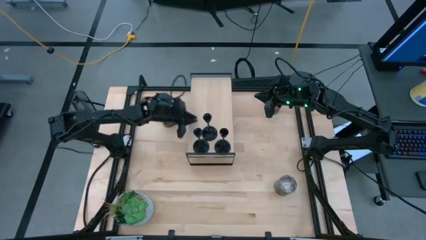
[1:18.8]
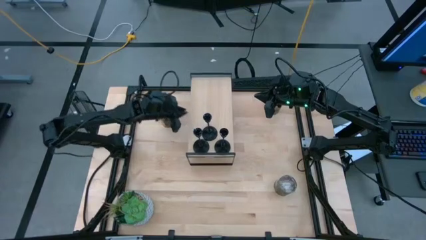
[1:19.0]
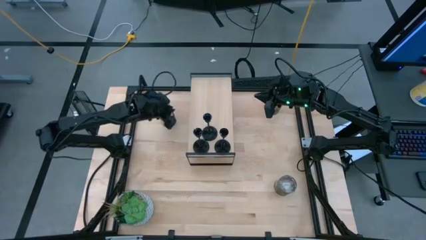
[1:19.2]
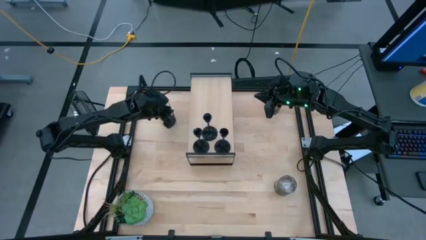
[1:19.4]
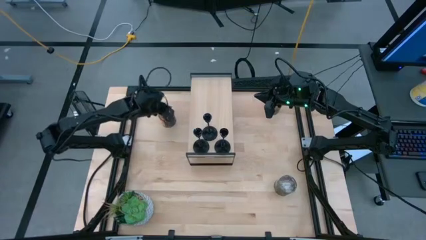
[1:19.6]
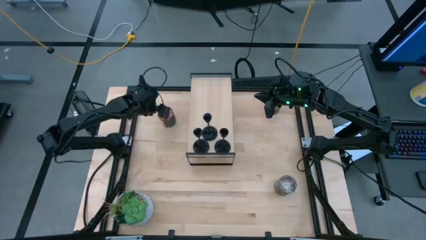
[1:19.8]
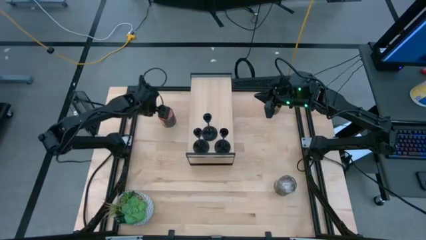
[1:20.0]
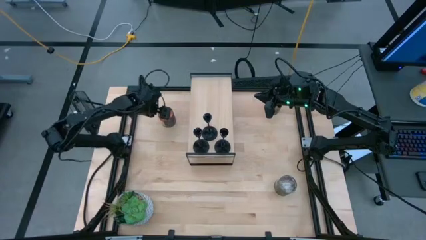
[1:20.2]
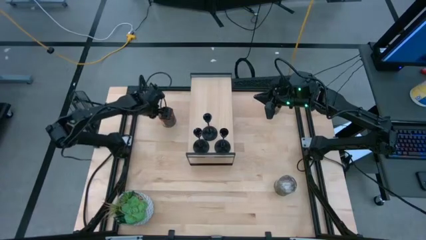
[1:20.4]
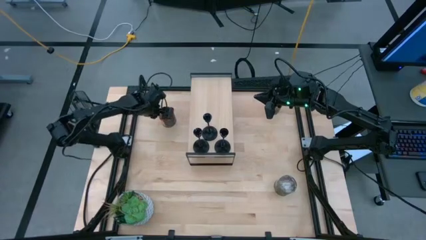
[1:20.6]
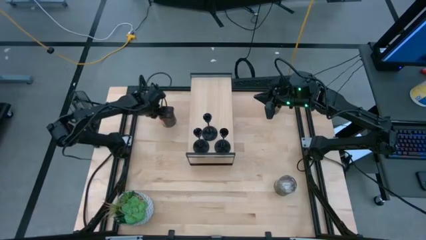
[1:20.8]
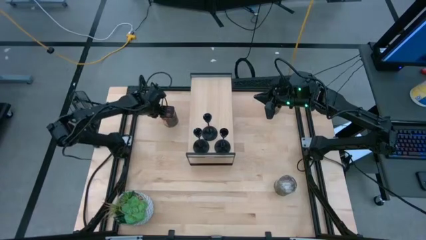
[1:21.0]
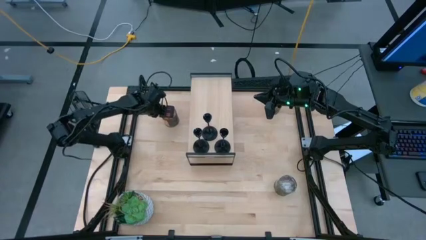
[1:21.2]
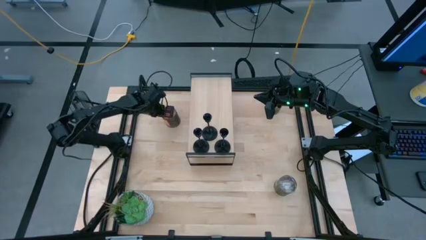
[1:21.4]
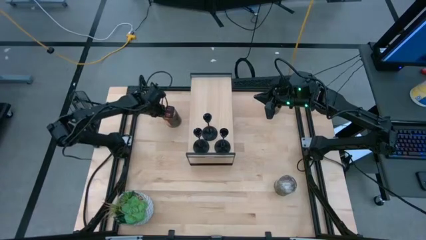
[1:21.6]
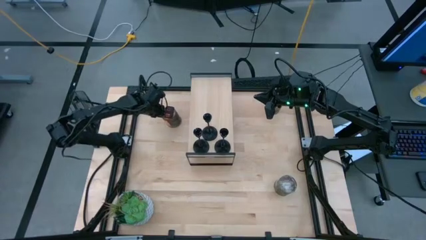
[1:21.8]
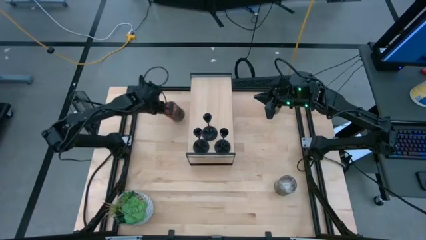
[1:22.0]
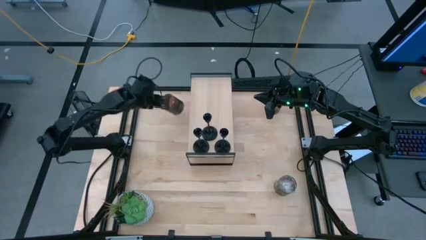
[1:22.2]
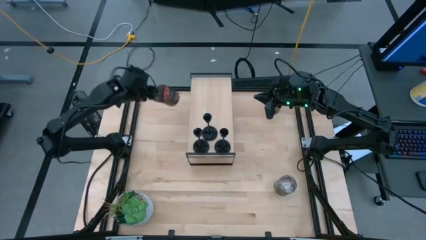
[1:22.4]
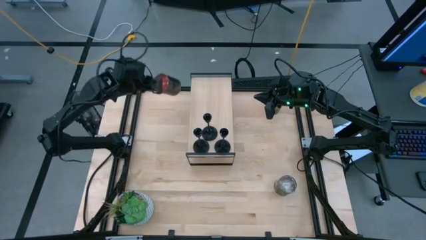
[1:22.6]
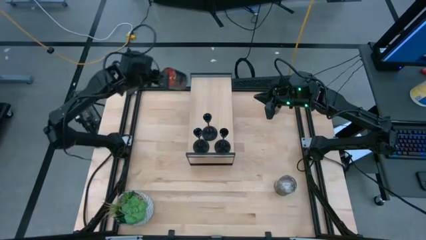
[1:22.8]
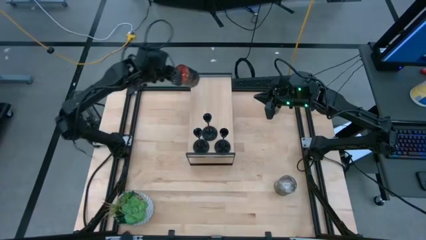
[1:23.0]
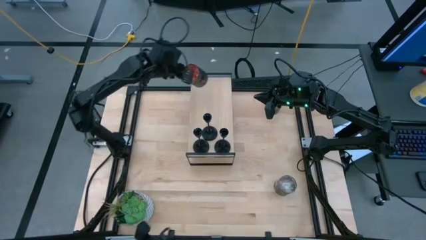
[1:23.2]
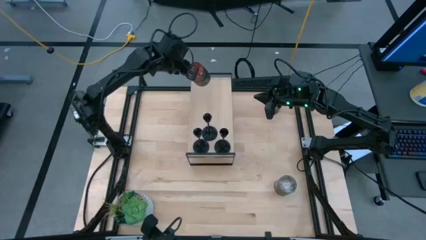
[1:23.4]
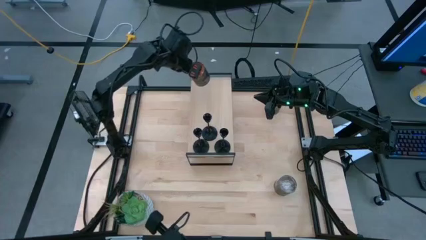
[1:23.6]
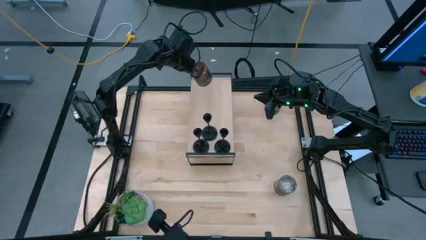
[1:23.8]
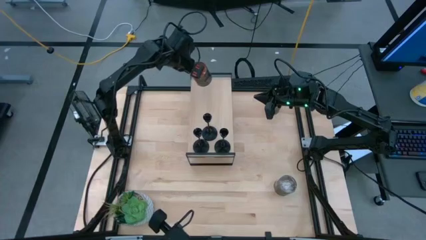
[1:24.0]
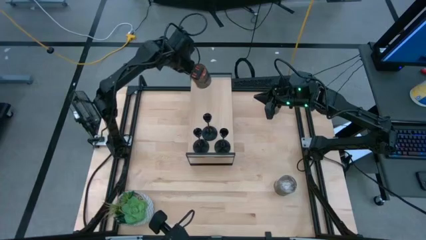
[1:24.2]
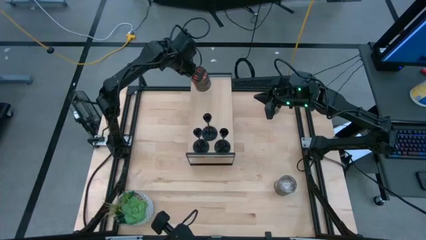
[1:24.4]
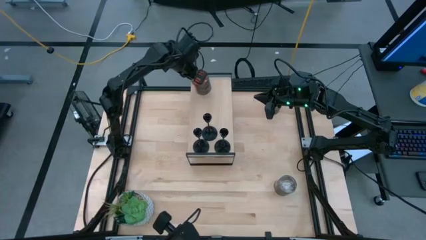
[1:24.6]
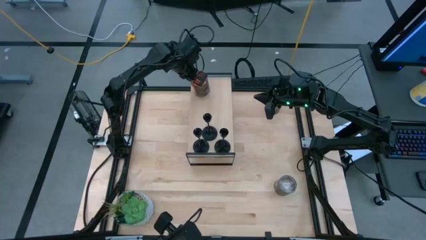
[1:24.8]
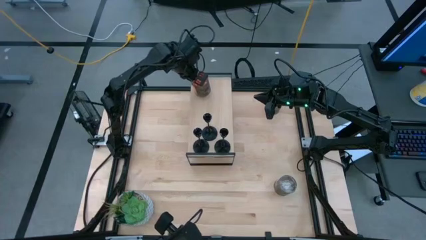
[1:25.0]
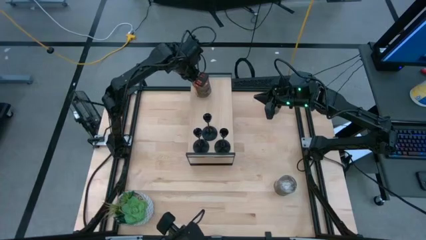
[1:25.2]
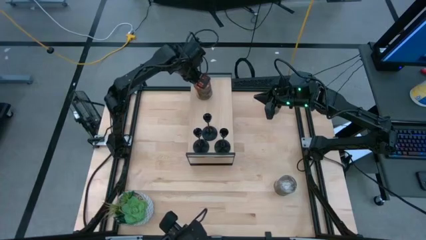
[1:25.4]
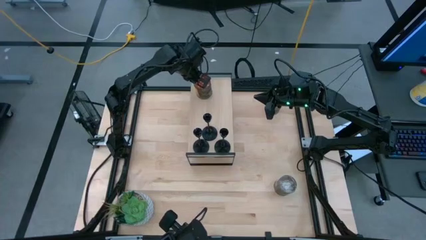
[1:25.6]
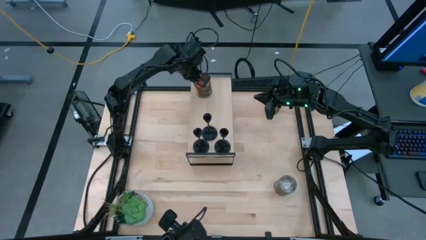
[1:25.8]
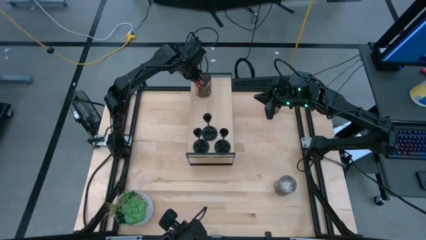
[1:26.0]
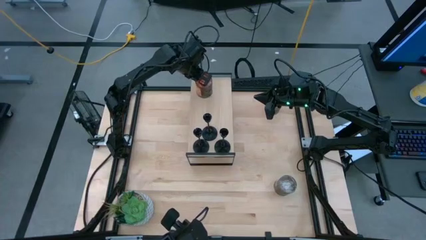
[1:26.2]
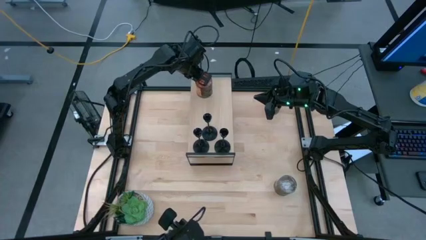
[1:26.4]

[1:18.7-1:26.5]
Task: Pick & Place candle stick holders
Put the left orange scented candle on the shelf

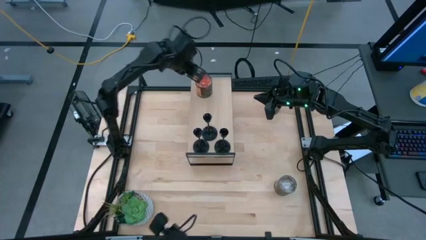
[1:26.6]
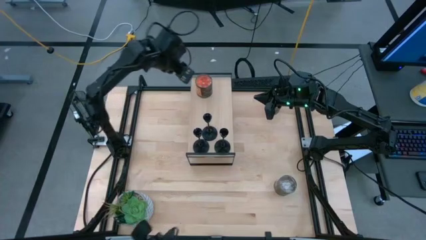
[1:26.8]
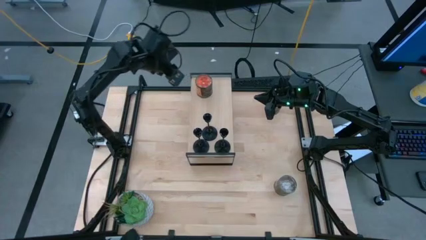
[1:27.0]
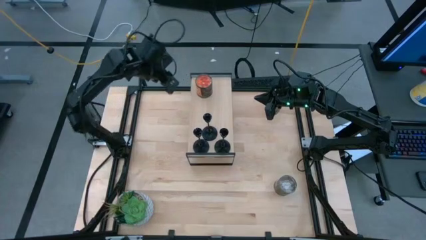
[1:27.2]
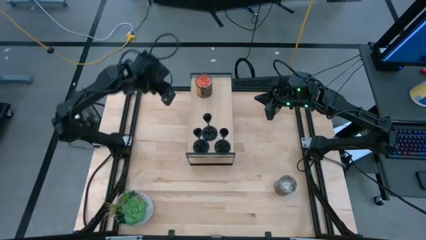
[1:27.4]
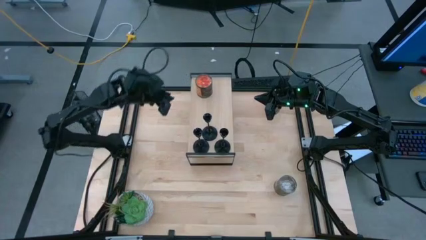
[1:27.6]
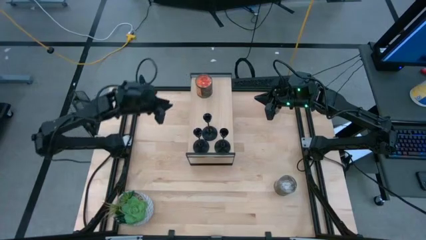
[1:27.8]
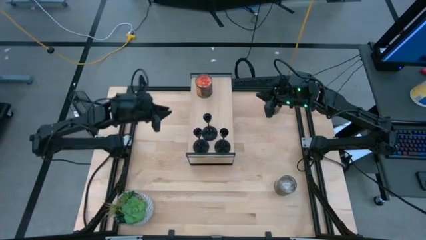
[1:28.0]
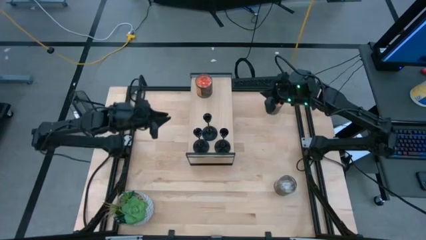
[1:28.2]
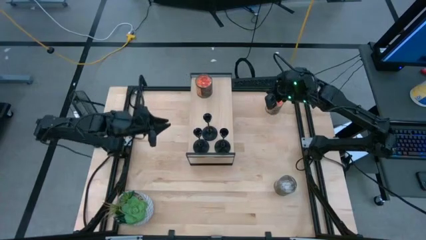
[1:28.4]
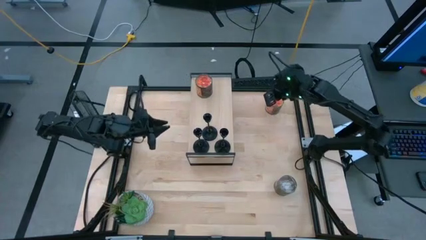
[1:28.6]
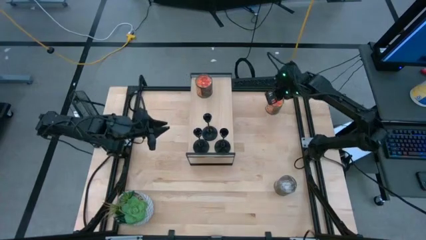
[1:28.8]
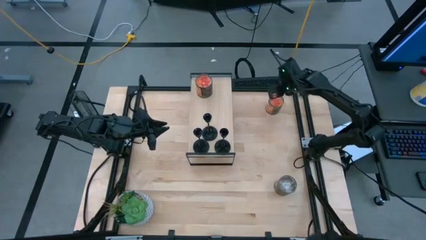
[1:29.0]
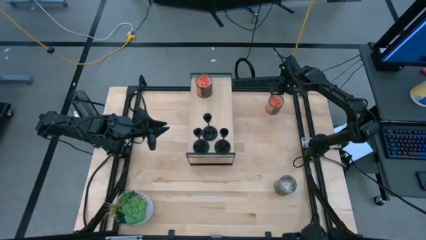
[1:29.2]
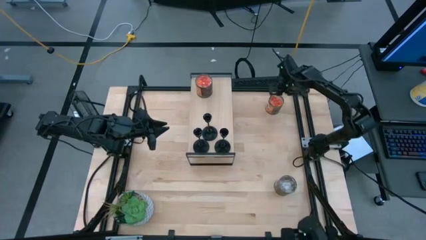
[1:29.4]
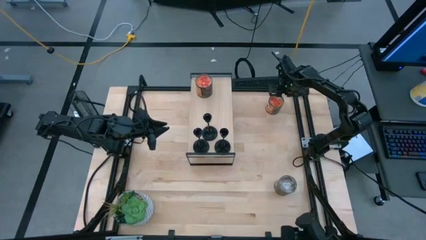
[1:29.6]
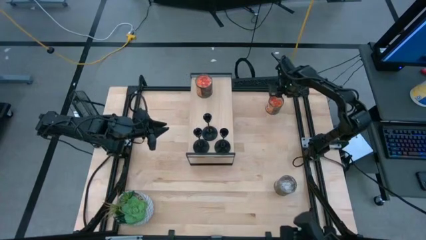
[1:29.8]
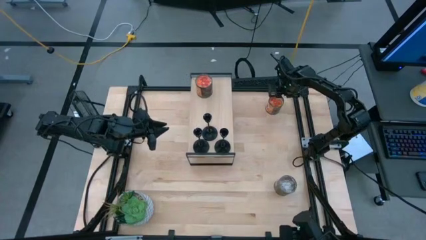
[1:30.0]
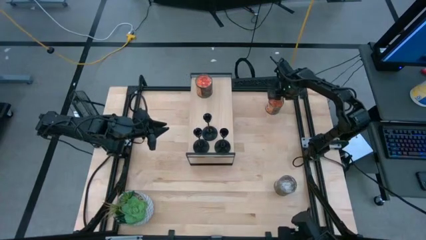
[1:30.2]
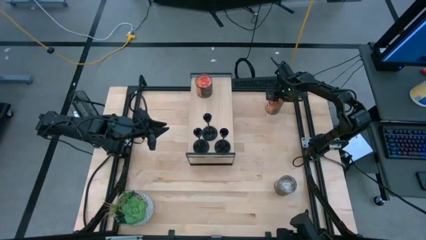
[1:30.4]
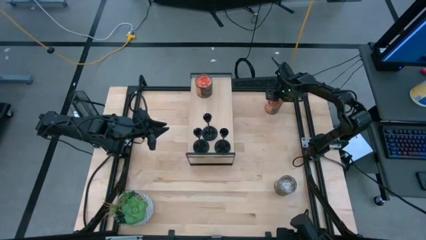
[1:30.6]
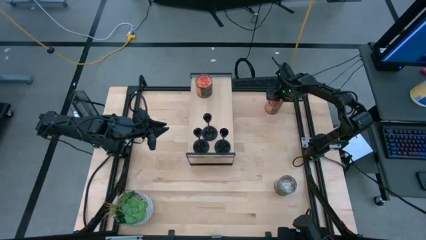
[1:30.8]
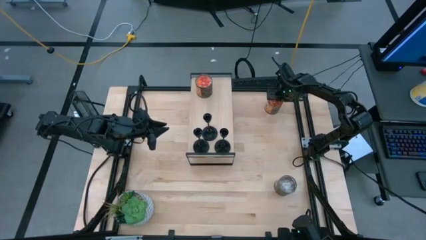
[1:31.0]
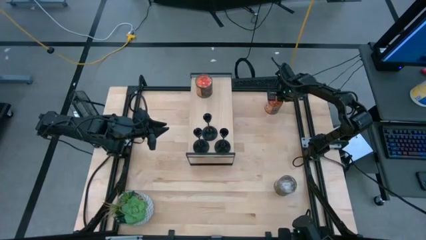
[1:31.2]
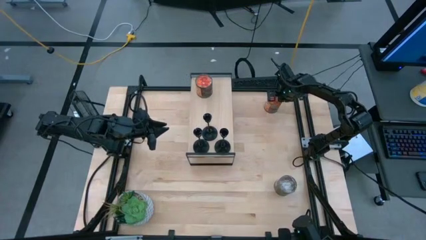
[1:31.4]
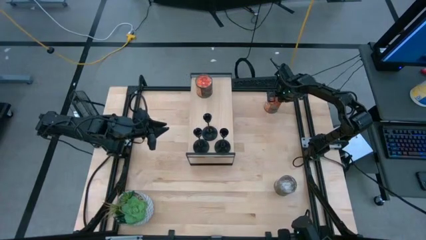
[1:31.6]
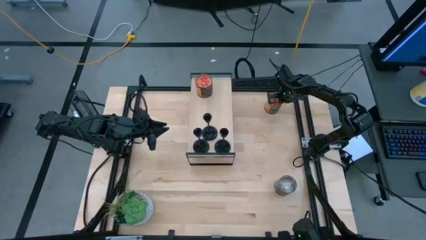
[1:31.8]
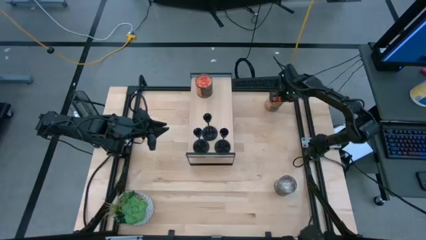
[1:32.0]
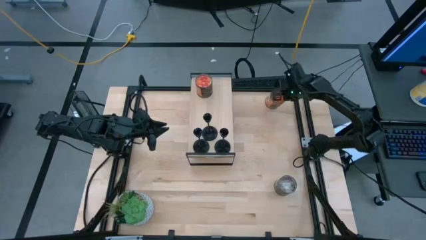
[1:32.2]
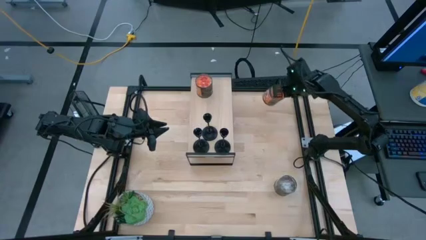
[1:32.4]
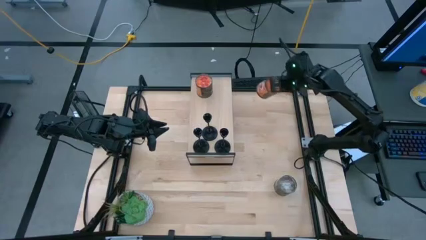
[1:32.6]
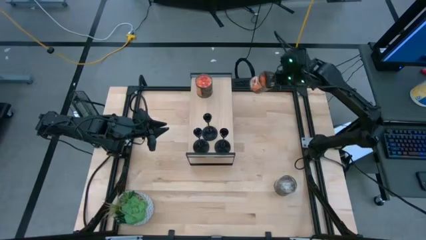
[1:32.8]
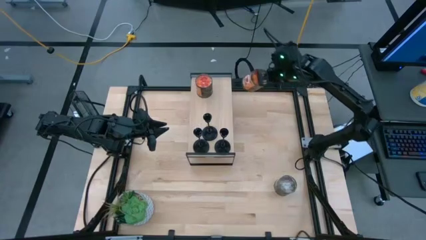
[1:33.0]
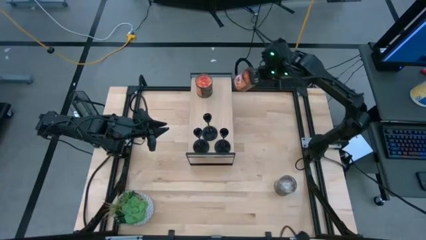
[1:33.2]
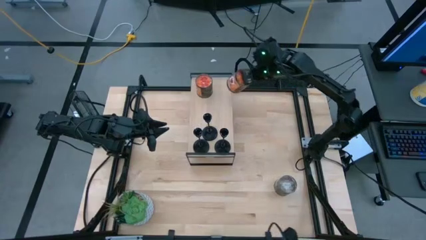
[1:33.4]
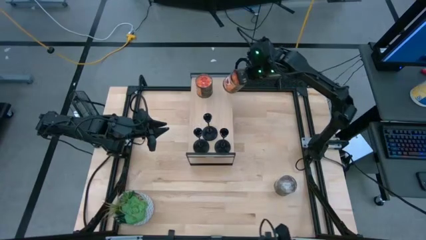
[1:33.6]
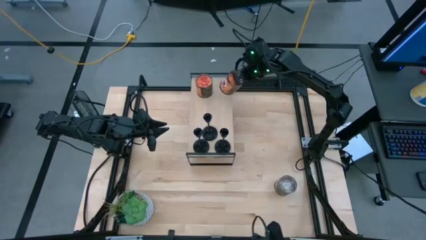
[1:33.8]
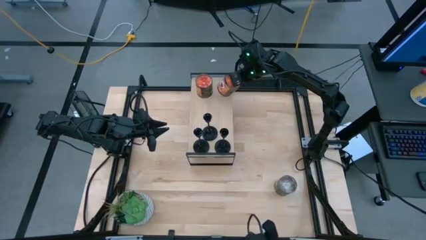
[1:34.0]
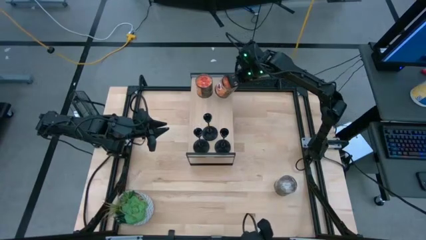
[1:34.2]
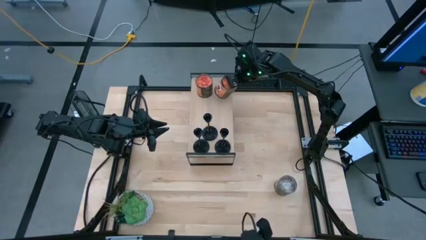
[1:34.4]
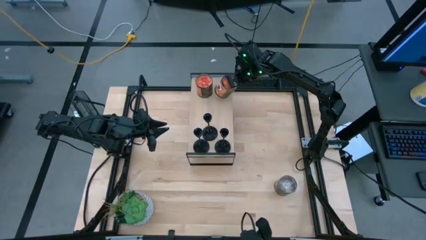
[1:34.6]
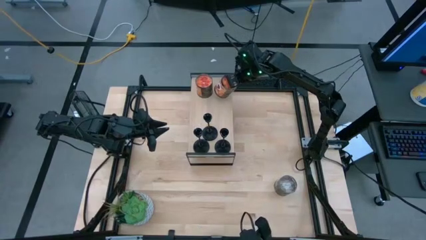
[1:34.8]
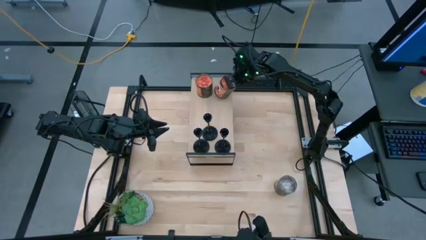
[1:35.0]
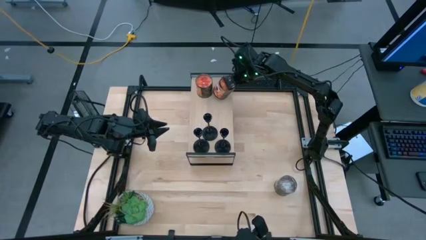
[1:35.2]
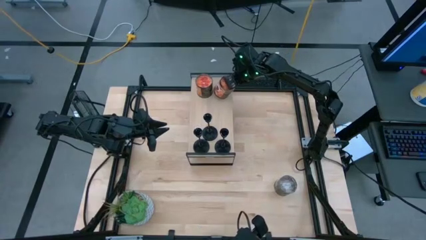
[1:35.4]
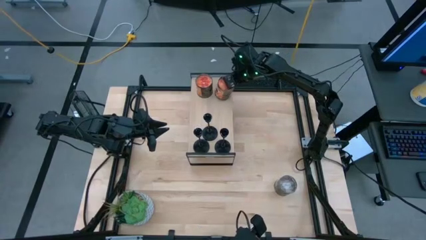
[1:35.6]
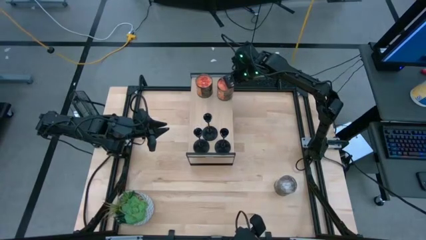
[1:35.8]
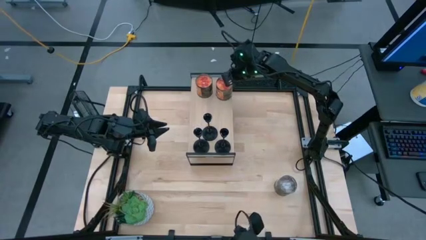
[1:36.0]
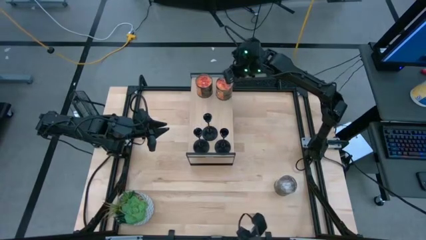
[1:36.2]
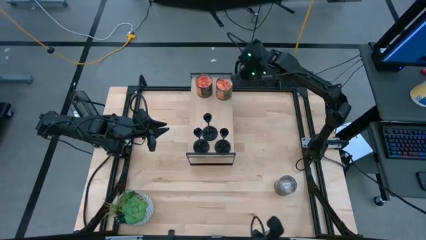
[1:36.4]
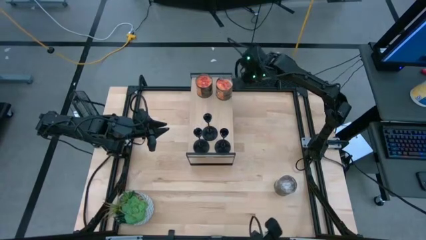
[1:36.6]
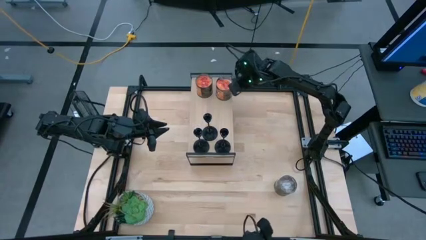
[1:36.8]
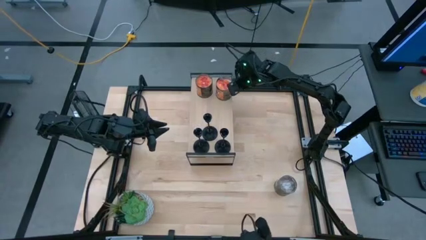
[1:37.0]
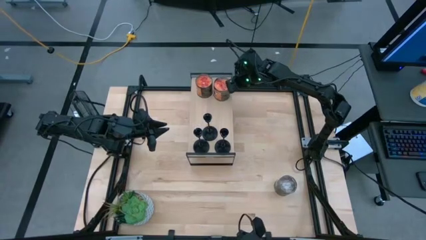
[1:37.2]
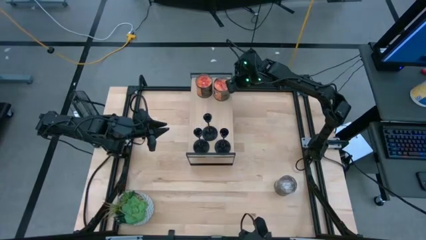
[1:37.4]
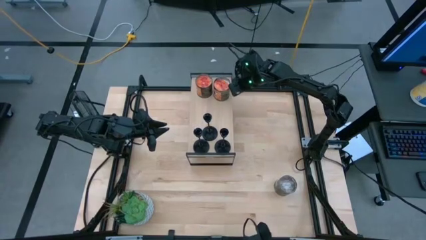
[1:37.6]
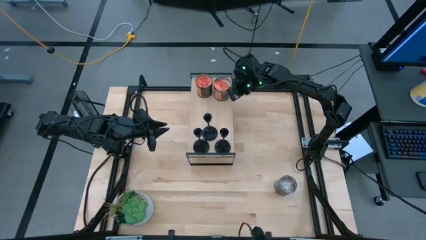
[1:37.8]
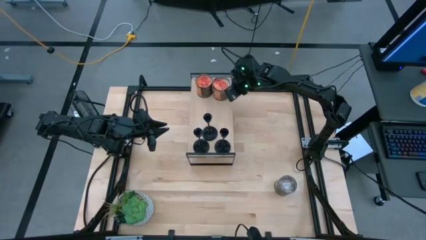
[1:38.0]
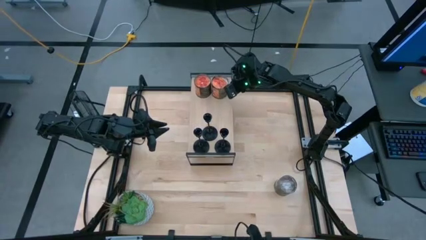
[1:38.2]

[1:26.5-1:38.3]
Put the orange scented candle on the shelf
